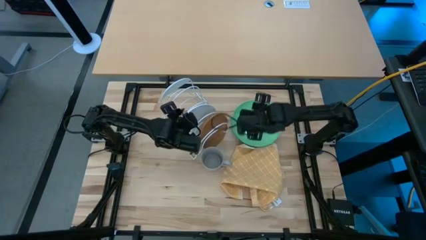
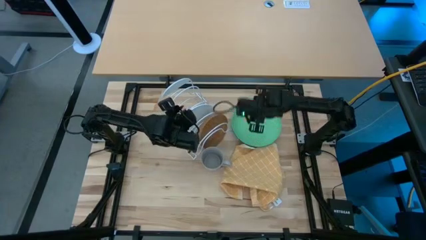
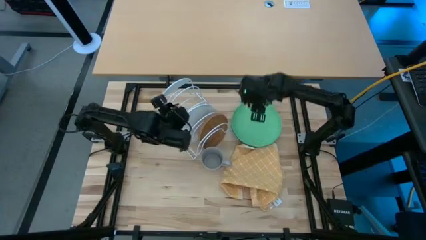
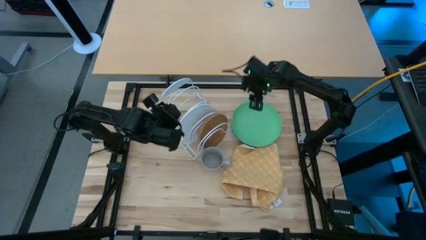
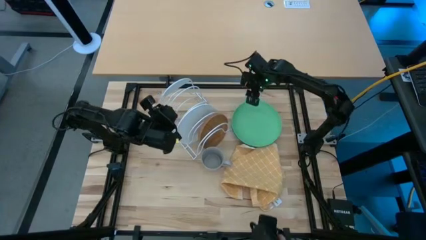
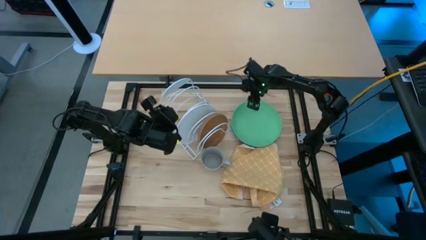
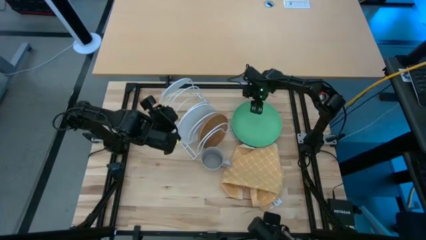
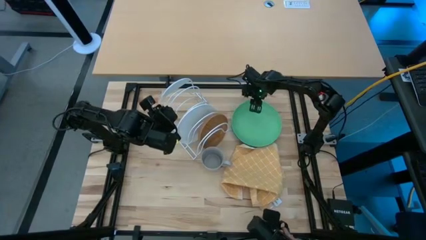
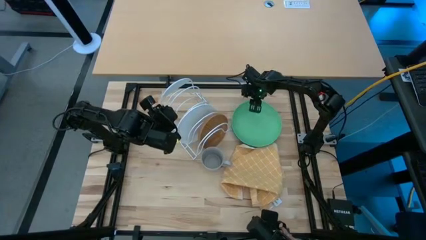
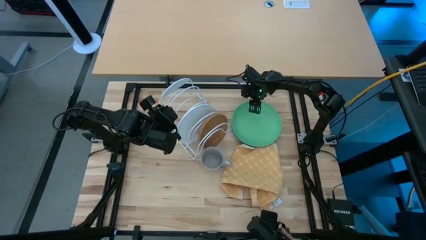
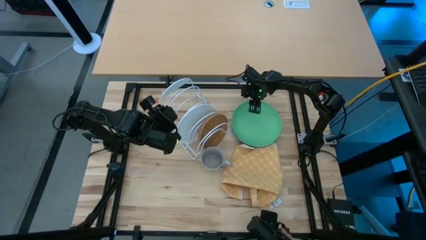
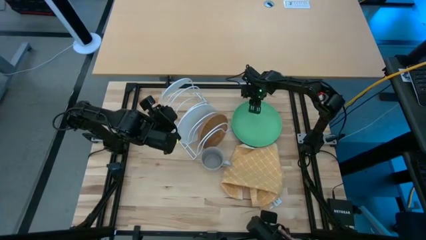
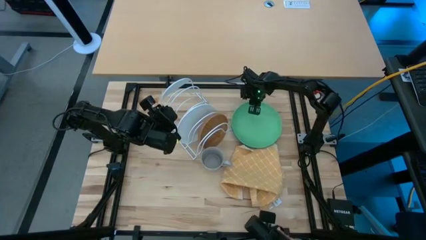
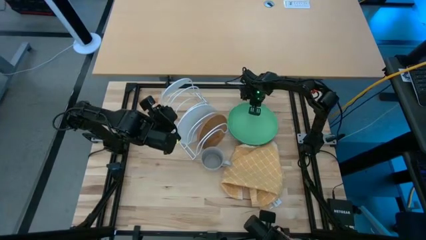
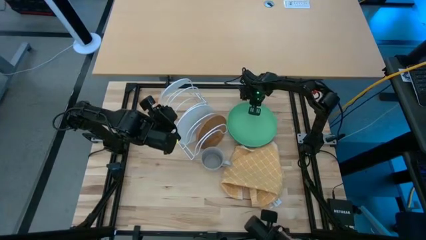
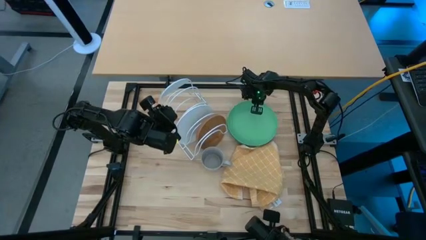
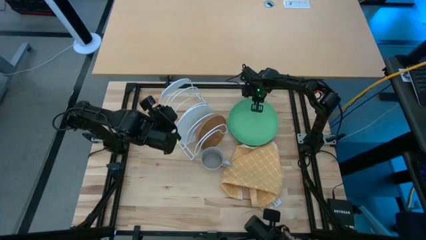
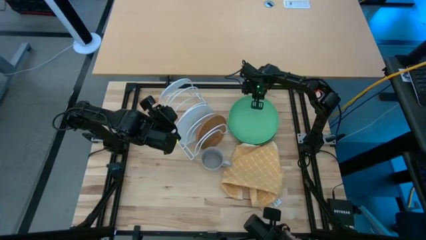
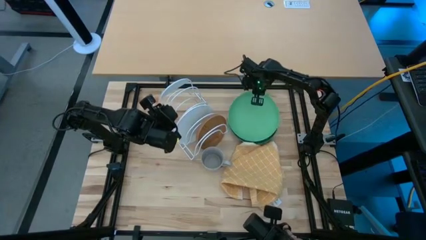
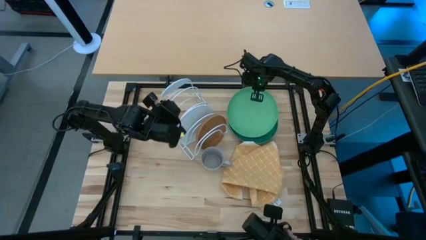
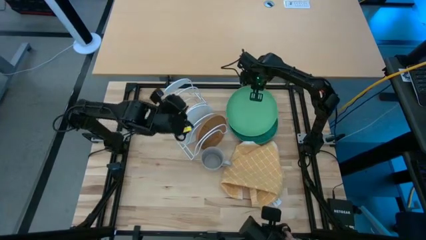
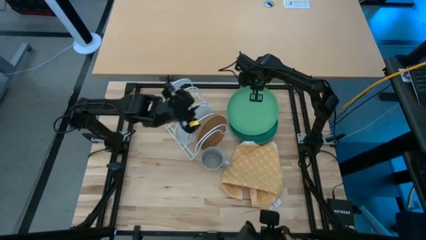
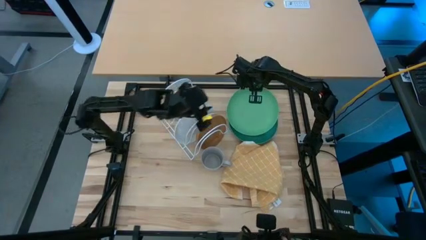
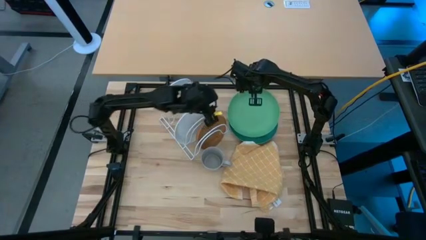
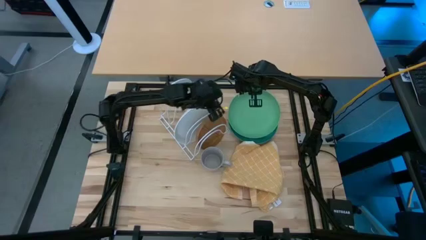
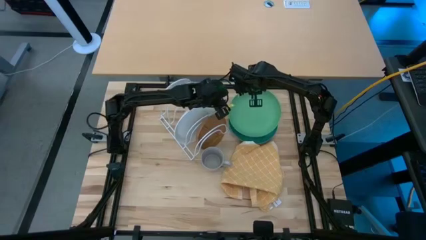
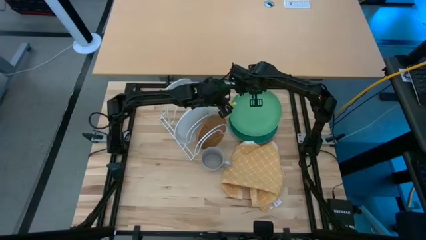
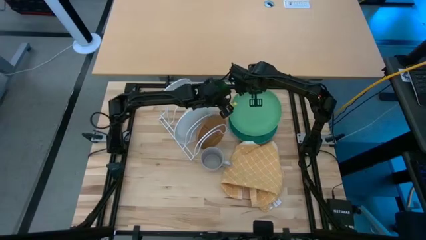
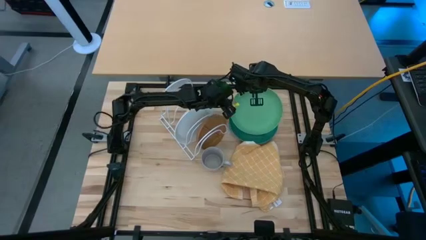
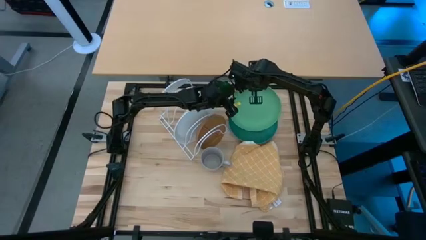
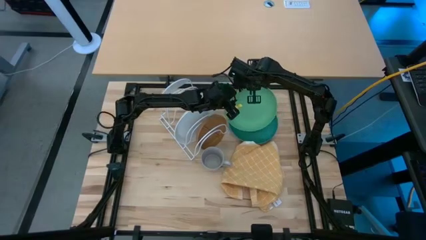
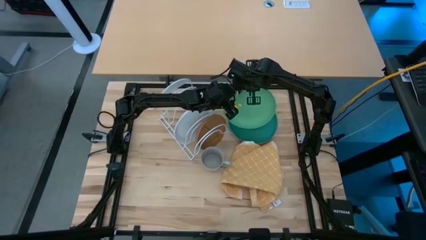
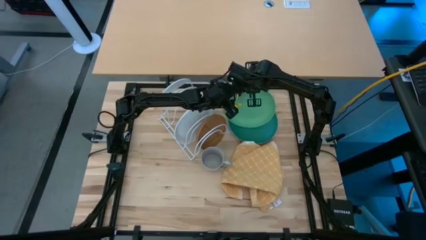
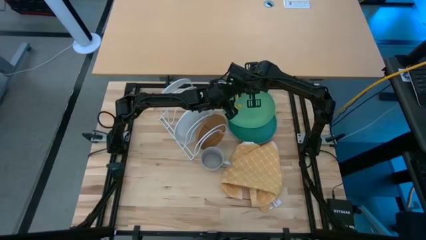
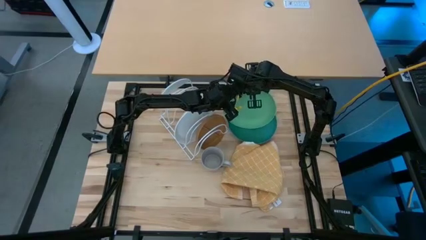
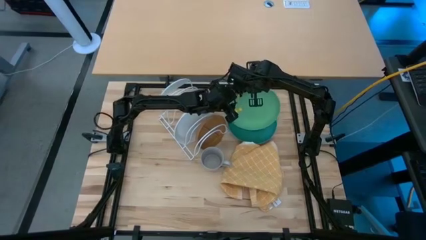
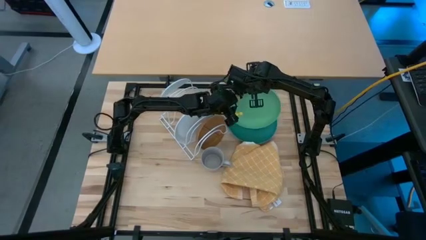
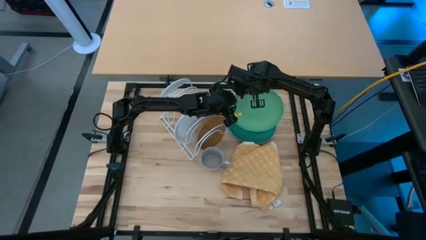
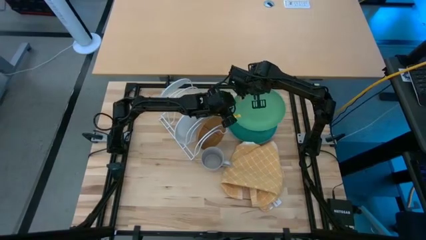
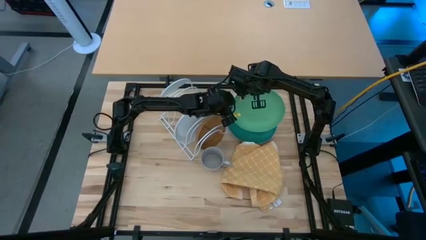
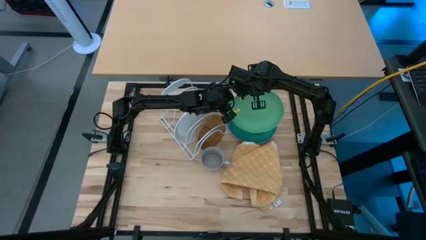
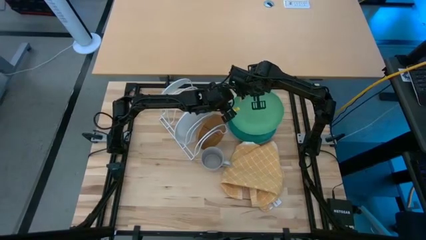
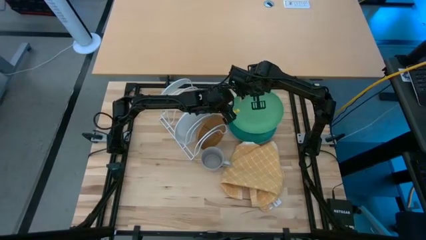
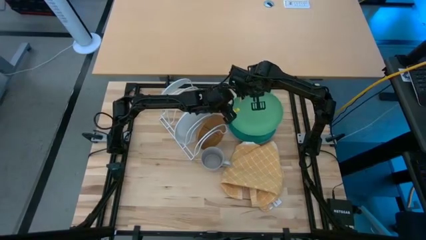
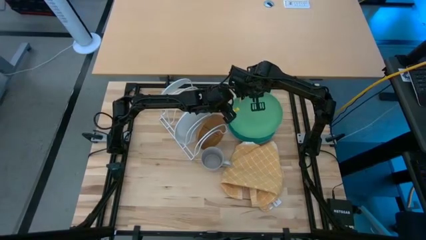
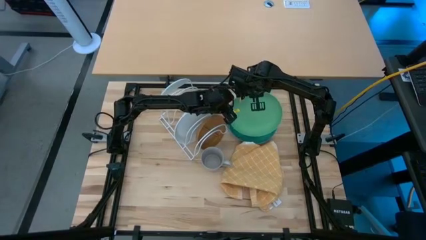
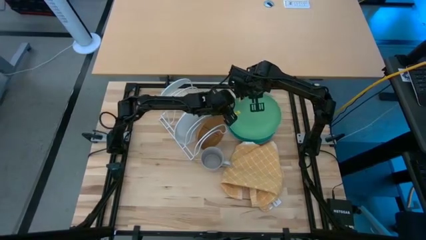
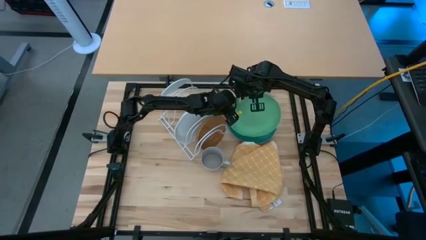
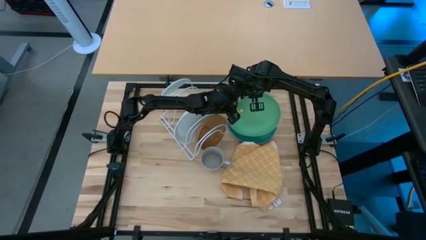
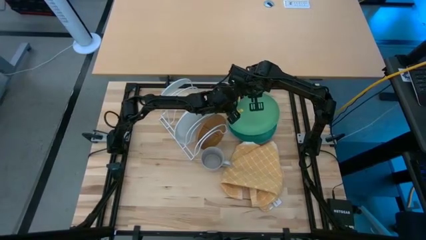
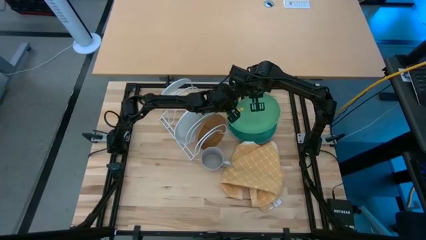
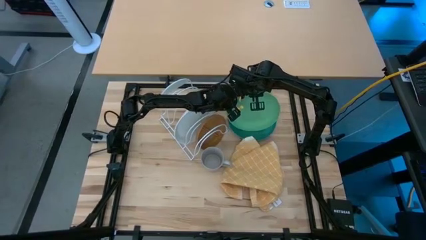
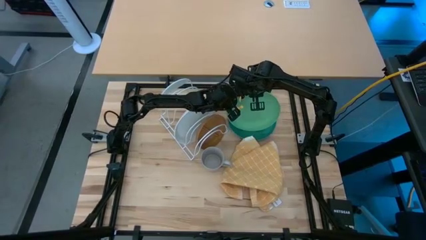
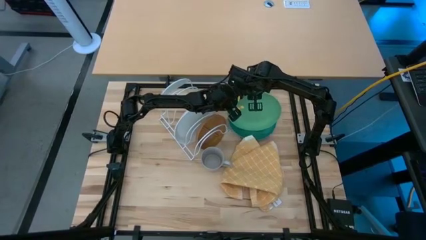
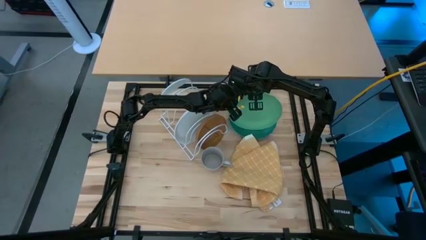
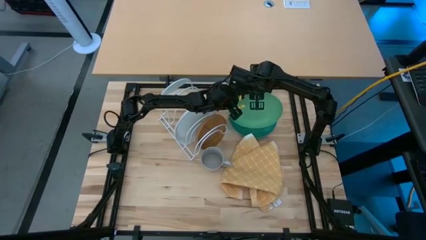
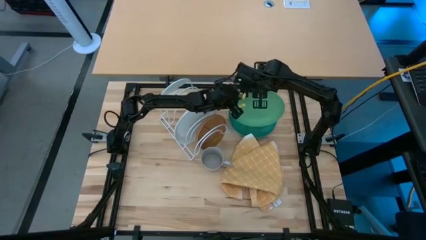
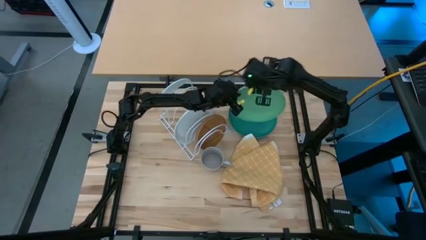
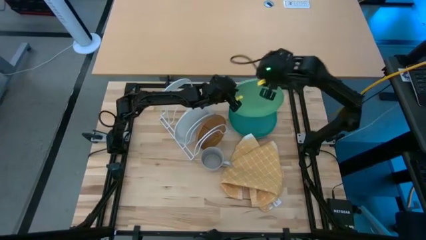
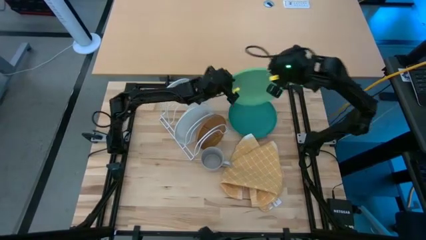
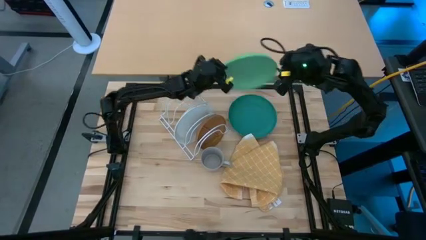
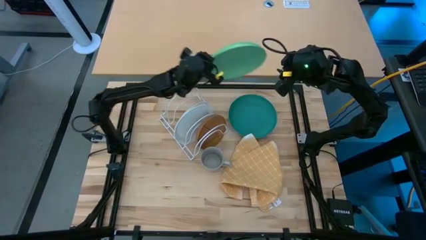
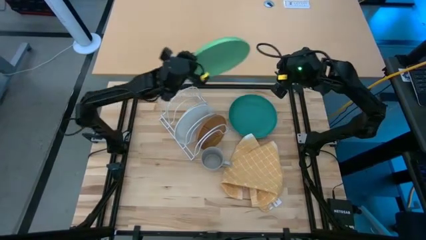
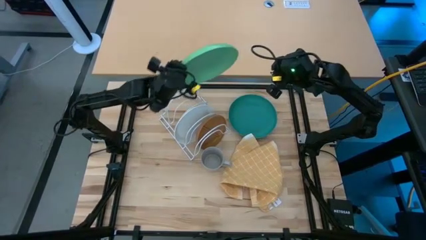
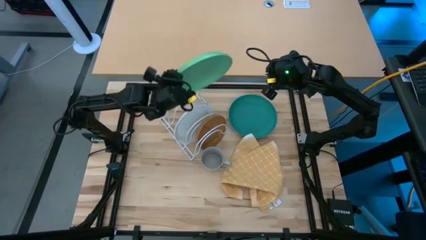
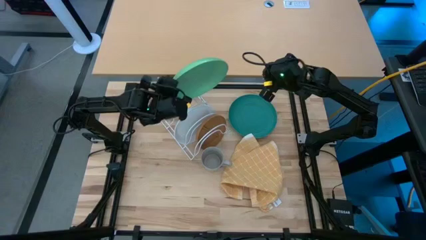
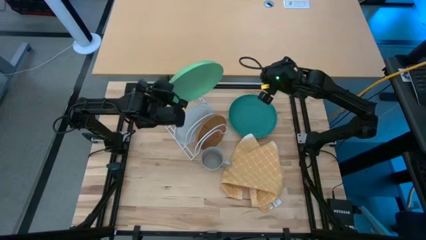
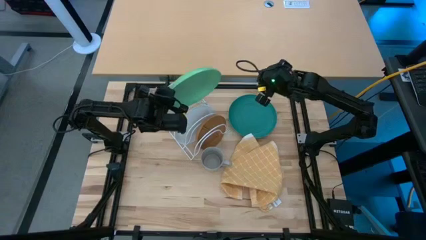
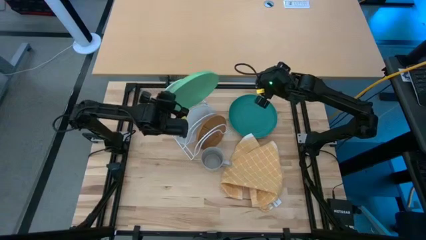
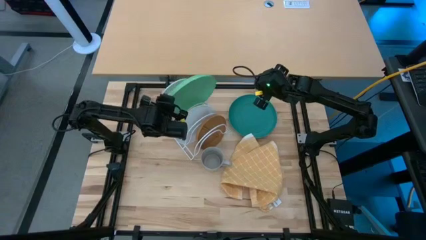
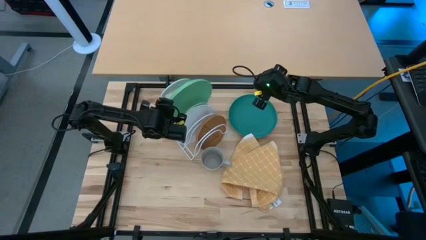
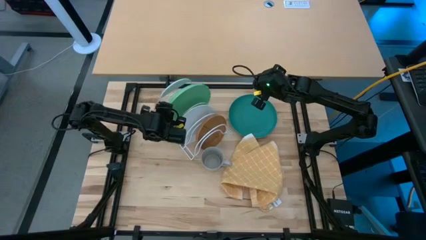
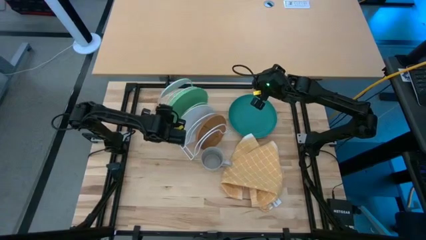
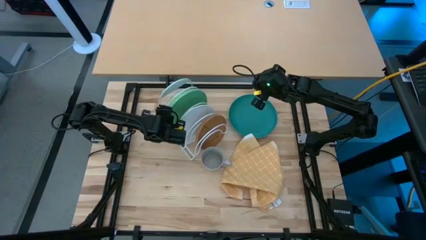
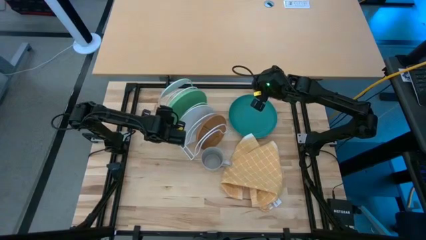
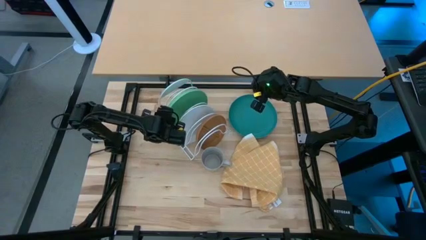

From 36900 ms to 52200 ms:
Task: Sort dishes
Put the green plate in the dish rack
